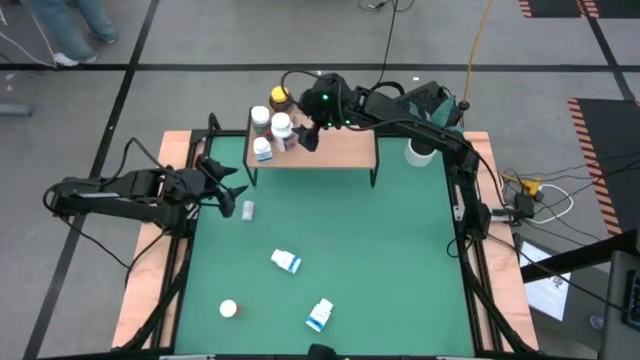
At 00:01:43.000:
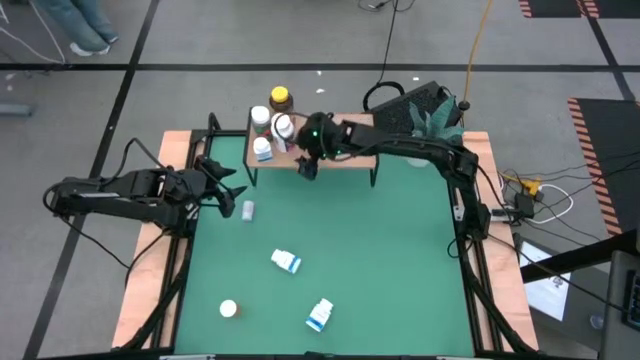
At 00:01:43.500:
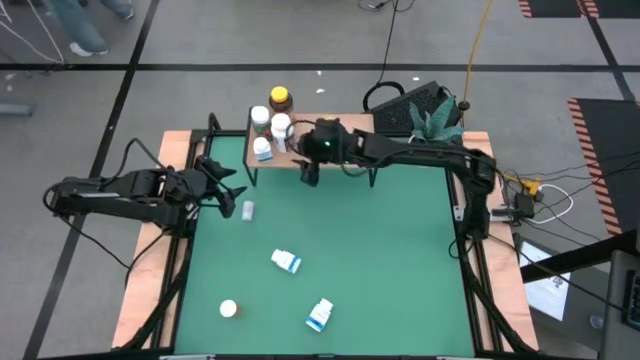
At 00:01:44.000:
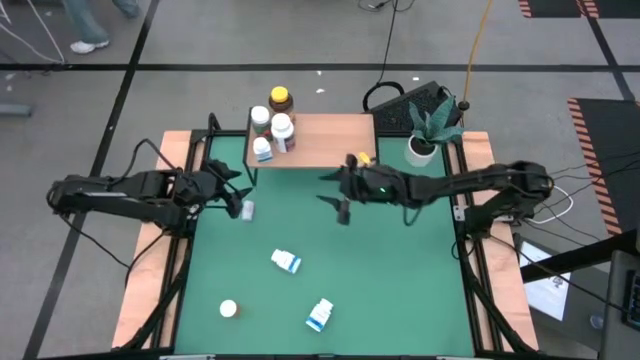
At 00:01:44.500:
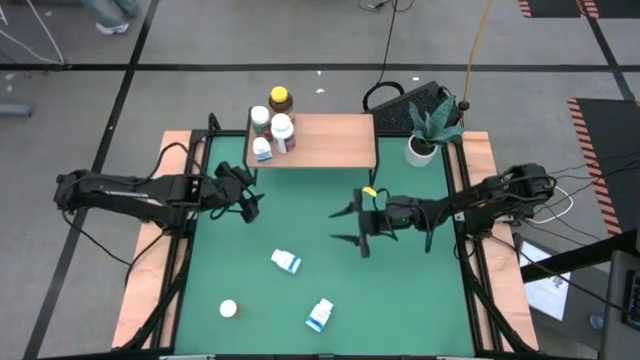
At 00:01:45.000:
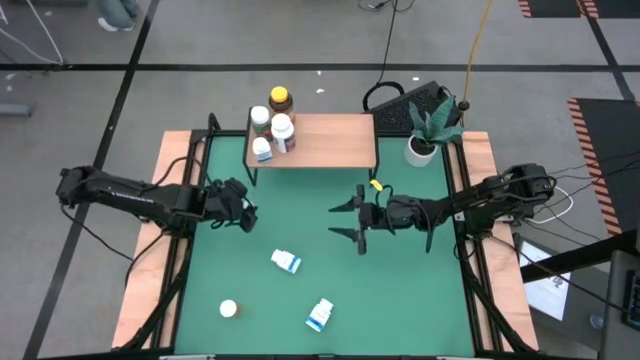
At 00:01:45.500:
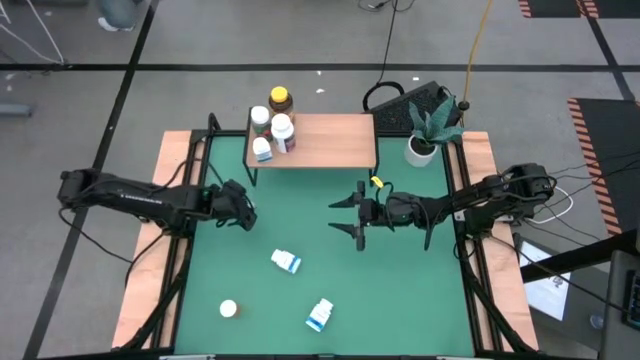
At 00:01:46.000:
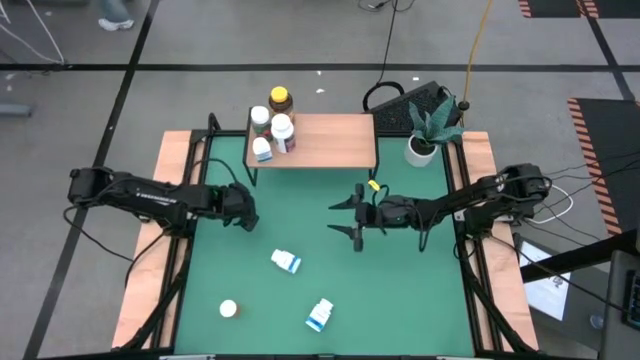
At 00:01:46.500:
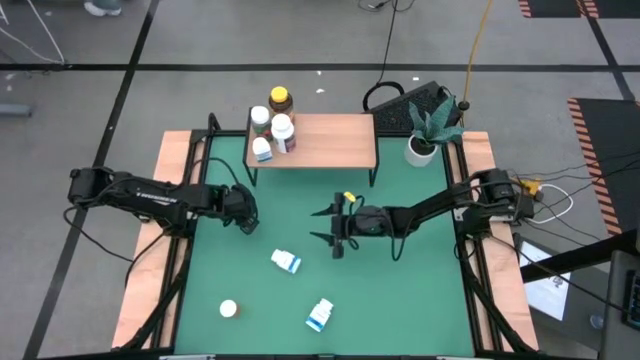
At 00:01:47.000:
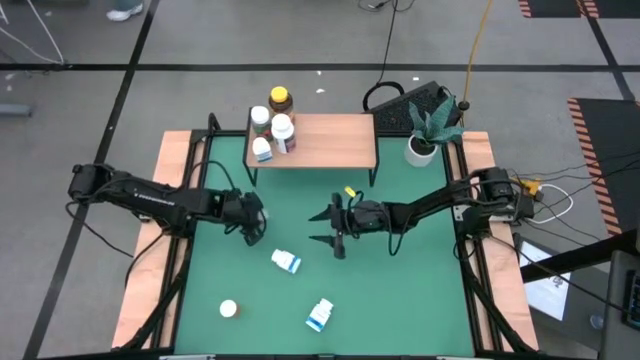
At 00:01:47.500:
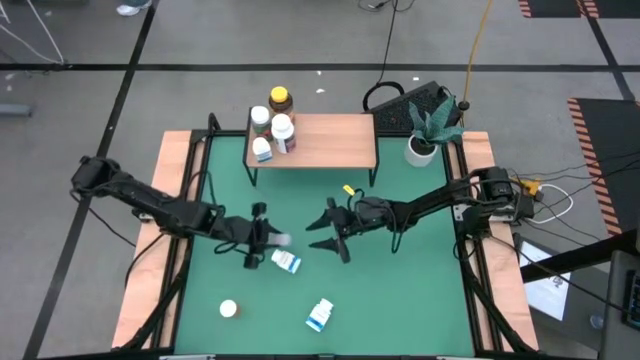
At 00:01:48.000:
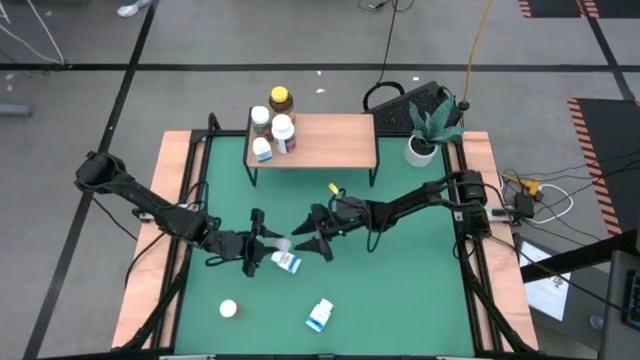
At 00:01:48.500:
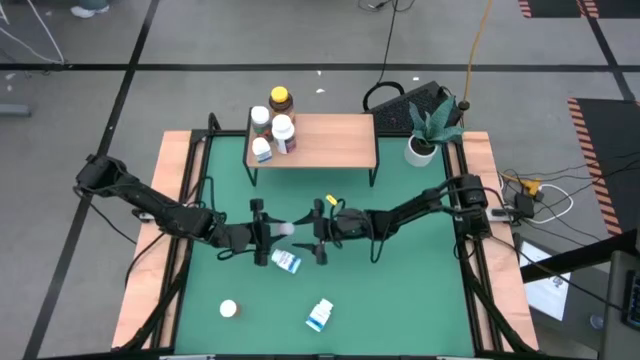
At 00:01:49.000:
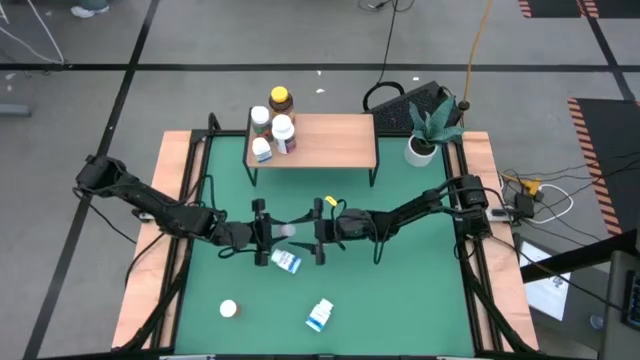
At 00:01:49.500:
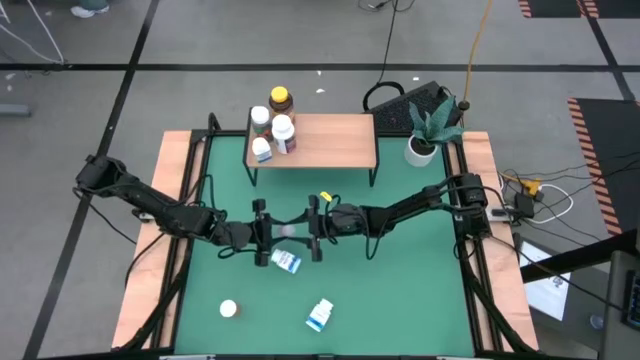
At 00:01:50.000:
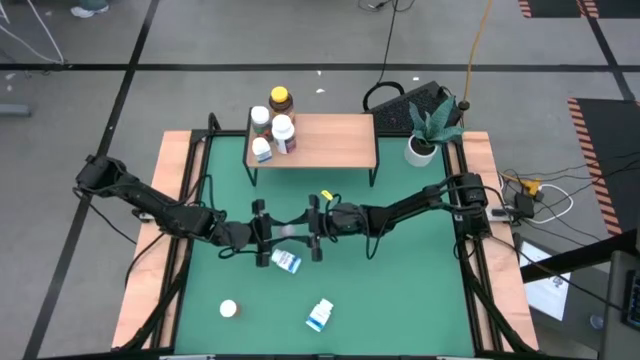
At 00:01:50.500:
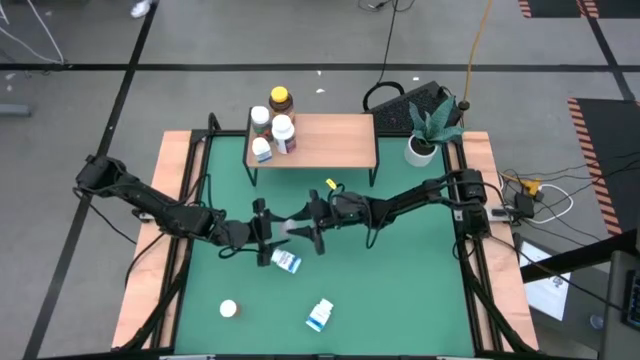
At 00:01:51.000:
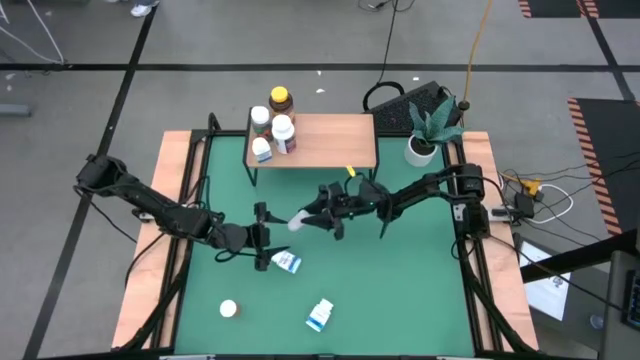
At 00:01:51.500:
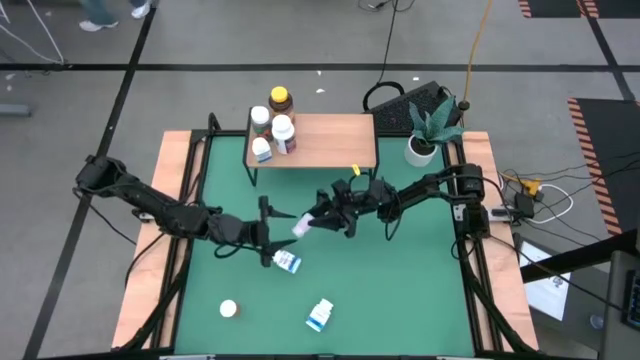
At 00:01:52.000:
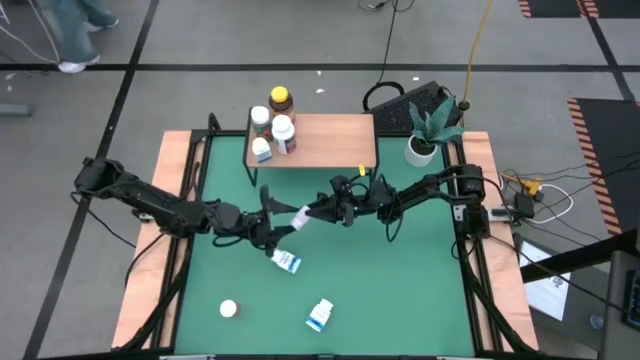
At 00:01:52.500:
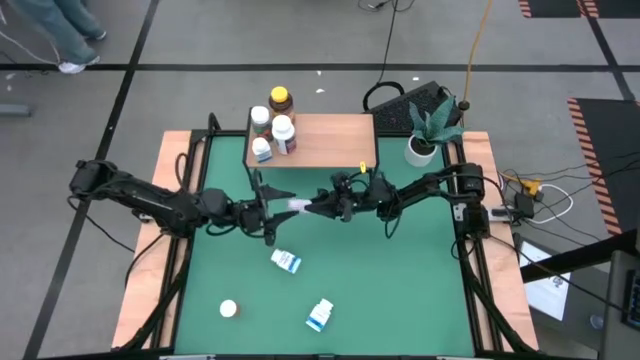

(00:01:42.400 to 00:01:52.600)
Task: Pick and place medicine bottles onto shelf by color
Put the transparent medicine bottle on the shelf

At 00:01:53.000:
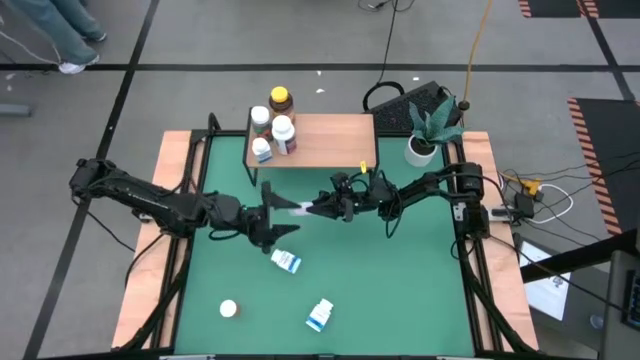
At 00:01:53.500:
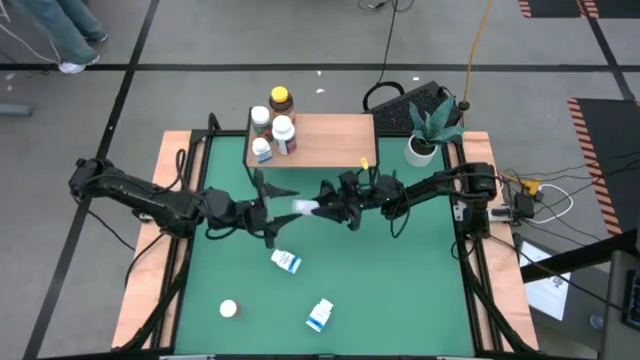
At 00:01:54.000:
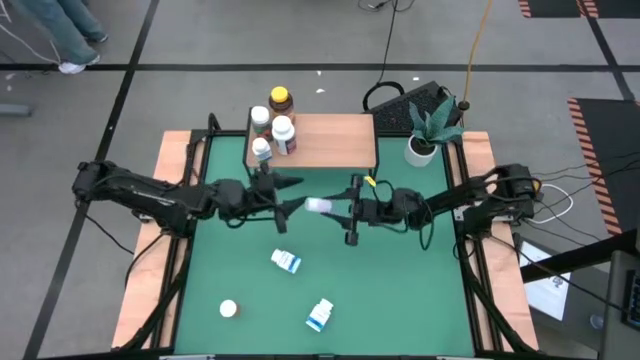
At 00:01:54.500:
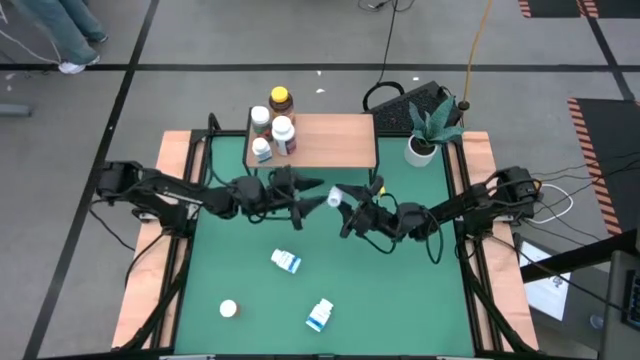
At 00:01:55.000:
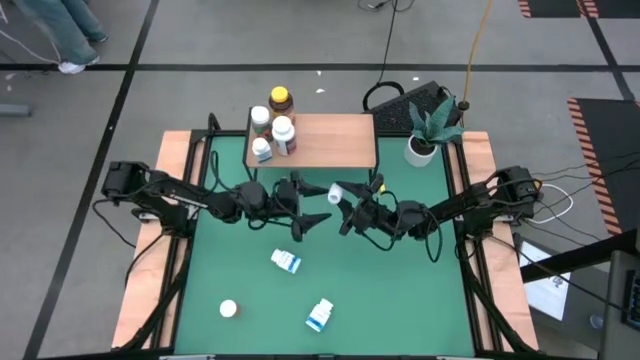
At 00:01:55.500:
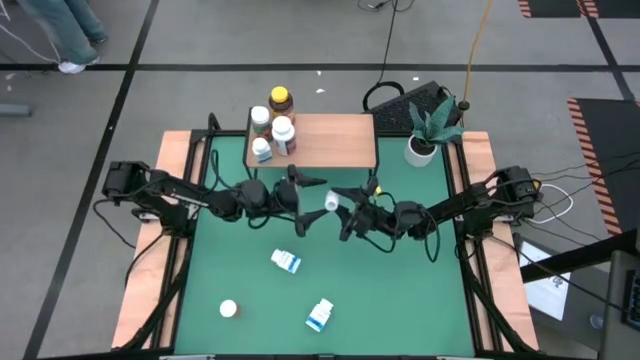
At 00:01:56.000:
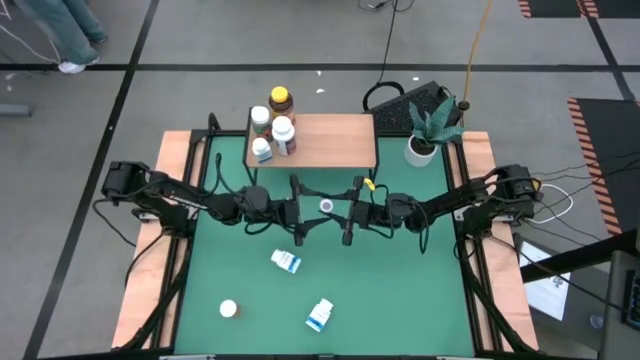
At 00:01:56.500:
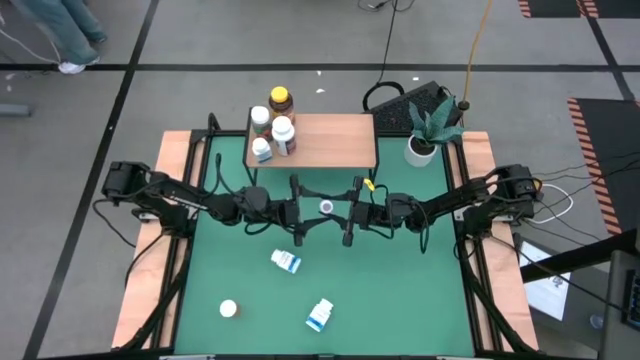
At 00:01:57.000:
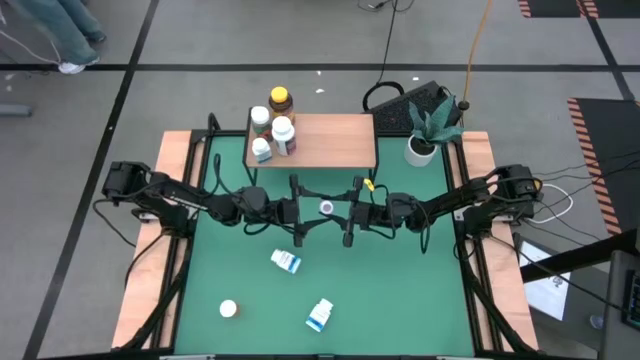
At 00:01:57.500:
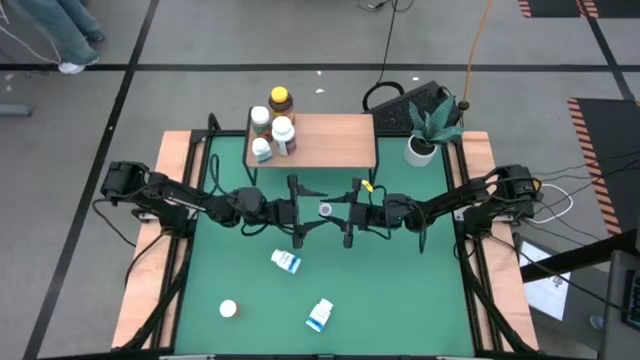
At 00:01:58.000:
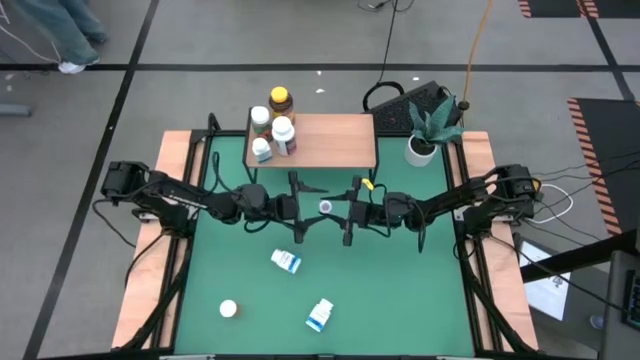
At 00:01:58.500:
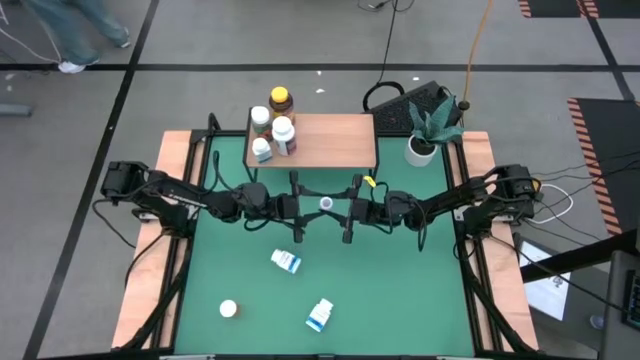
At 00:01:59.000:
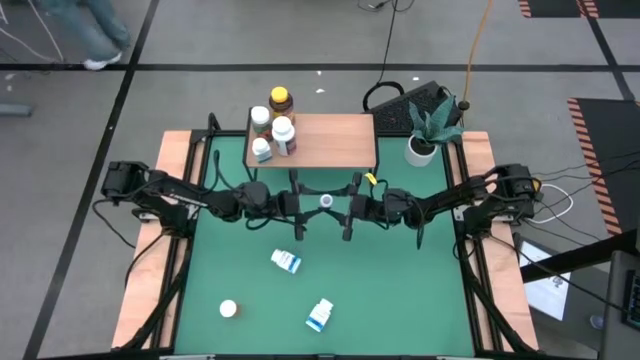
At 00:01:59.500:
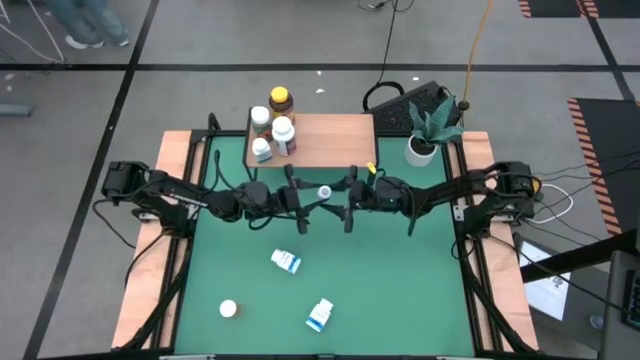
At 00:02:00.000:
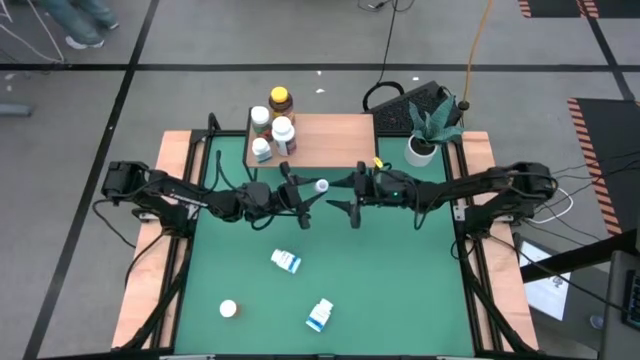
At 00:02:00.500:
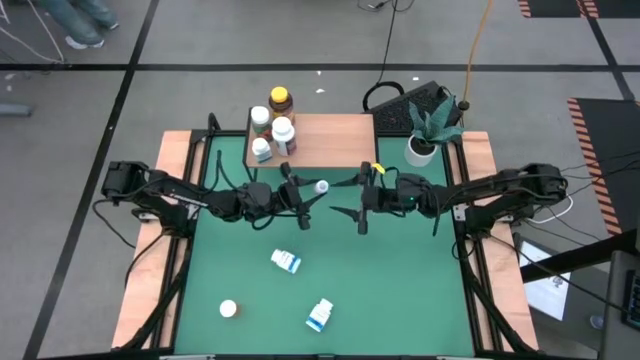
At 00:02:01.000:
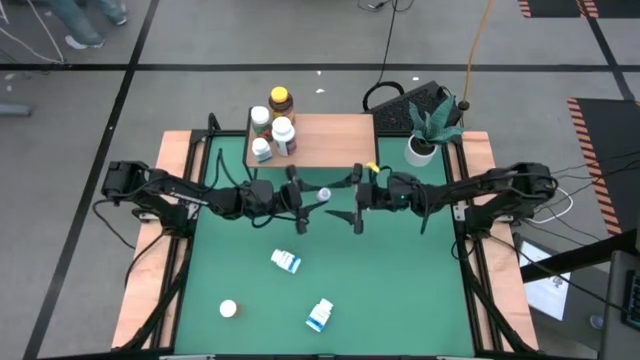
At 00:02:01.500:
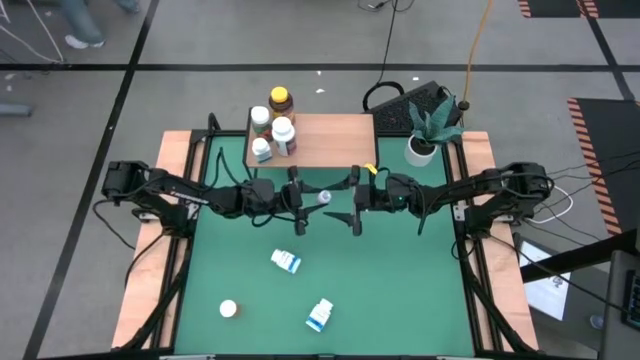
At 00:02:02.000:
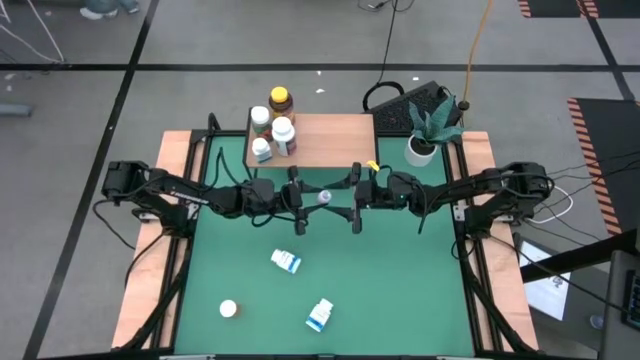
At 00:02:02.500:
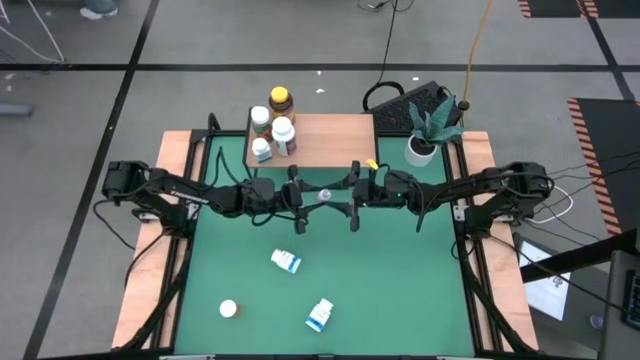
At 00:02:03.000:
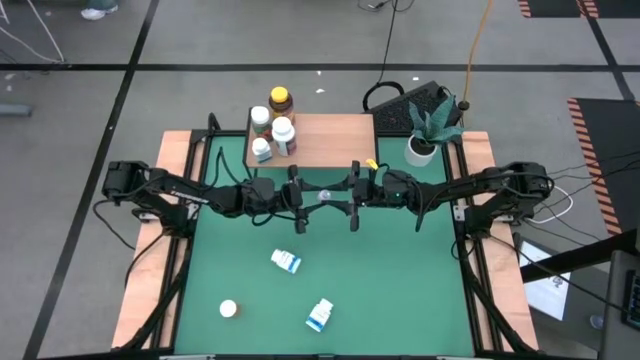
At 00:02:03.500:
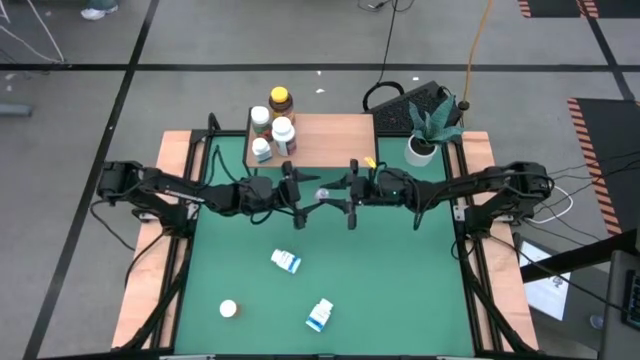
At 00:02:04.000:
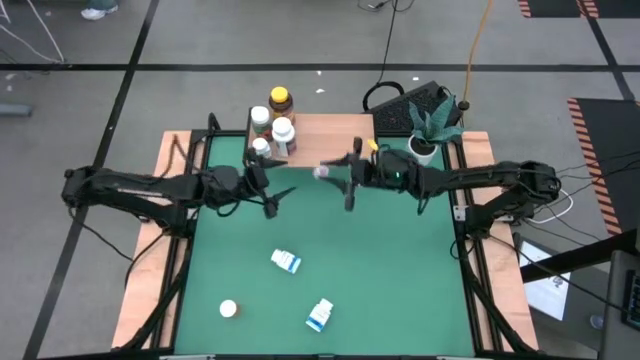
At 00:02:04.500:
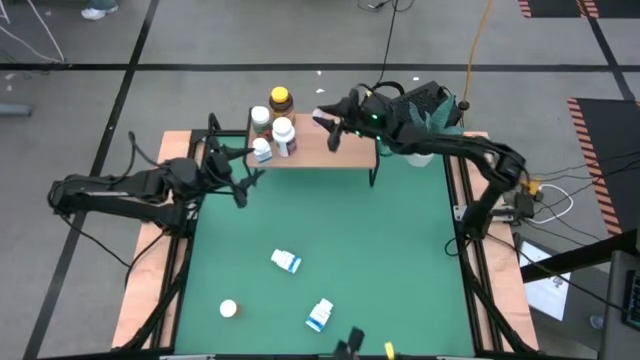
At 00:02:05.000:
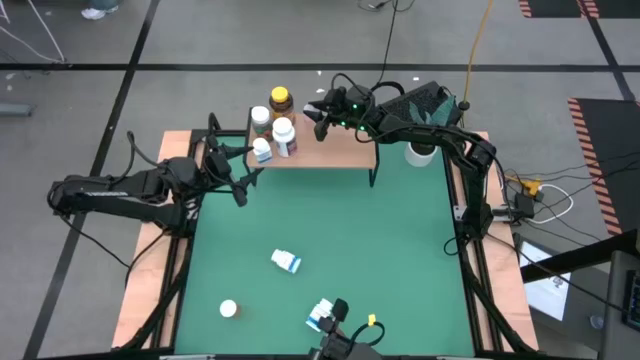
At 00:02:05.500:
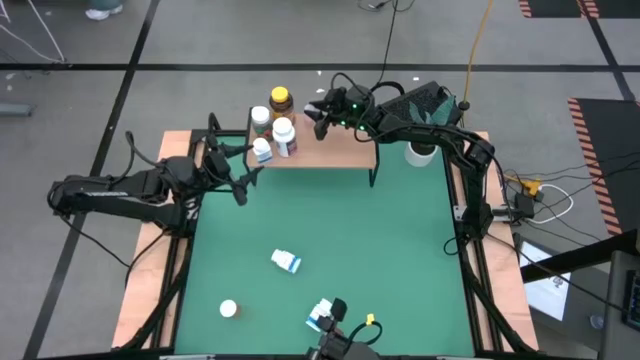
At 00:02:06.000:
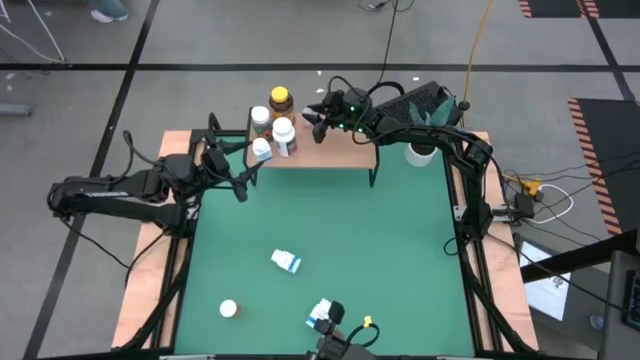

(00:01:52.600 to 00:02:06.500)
Put the transparent medicine bottle on the shelf
